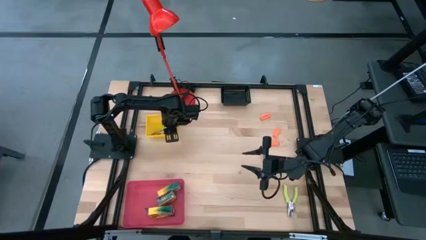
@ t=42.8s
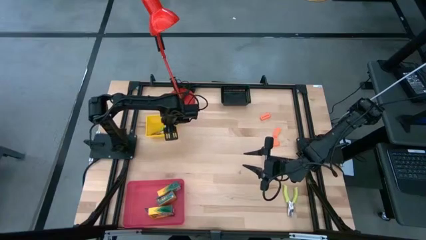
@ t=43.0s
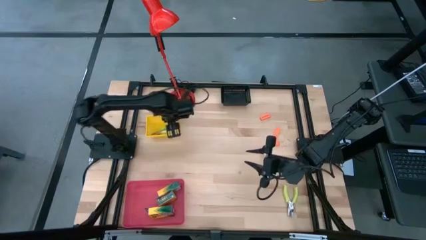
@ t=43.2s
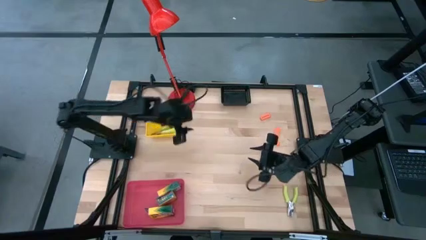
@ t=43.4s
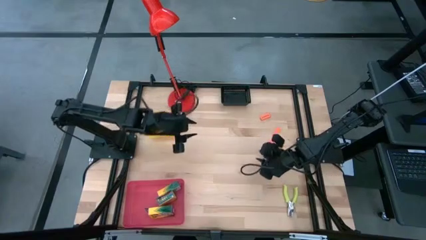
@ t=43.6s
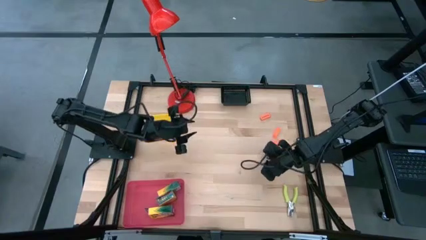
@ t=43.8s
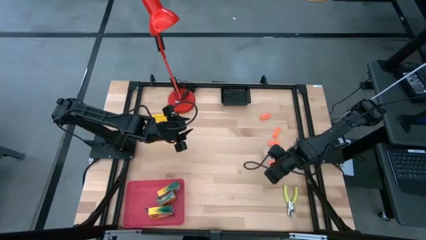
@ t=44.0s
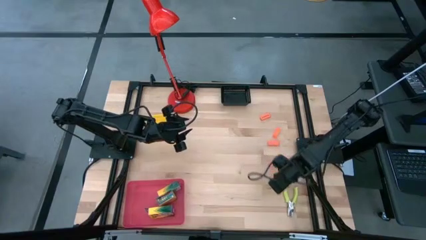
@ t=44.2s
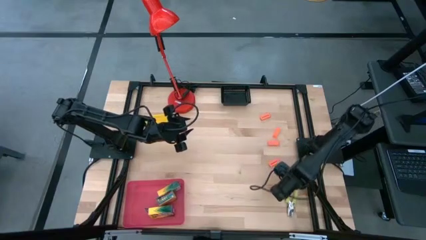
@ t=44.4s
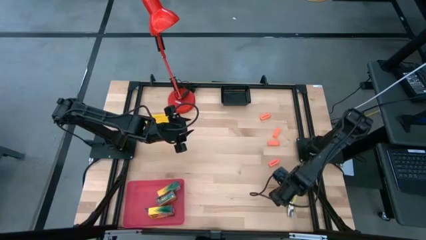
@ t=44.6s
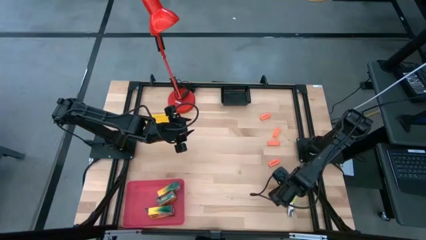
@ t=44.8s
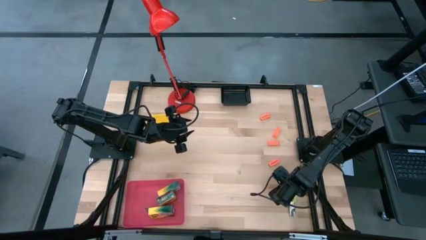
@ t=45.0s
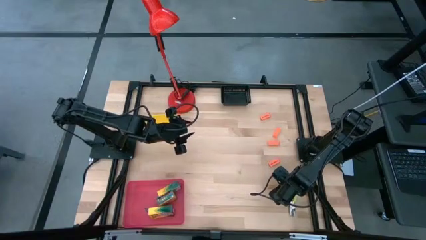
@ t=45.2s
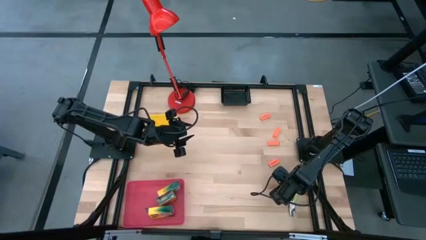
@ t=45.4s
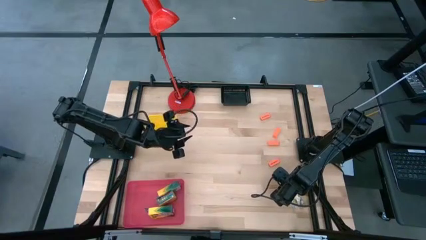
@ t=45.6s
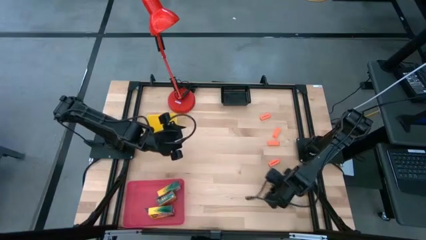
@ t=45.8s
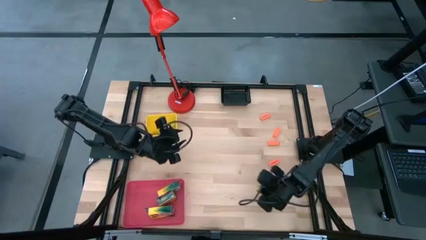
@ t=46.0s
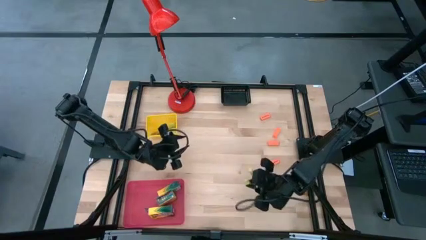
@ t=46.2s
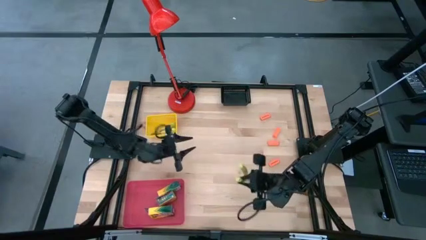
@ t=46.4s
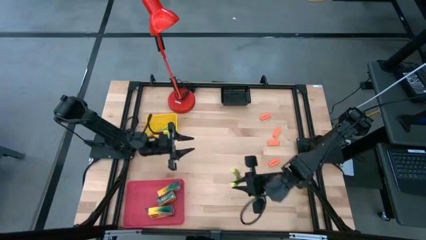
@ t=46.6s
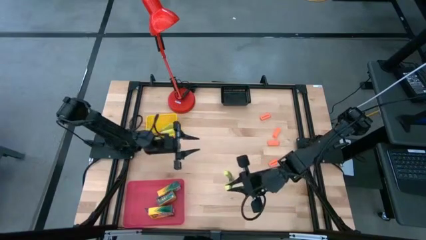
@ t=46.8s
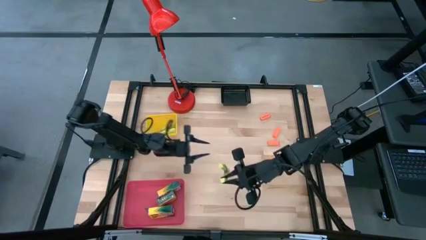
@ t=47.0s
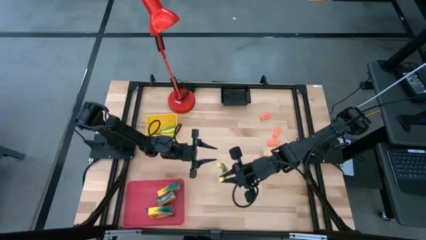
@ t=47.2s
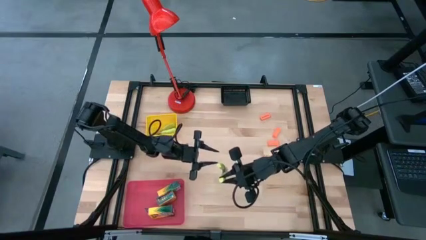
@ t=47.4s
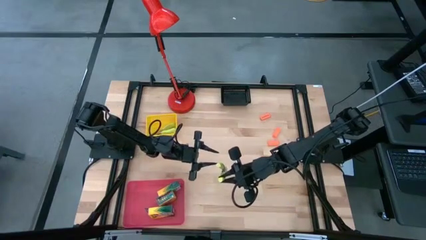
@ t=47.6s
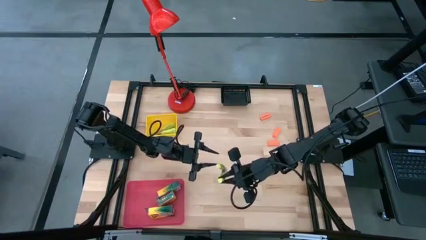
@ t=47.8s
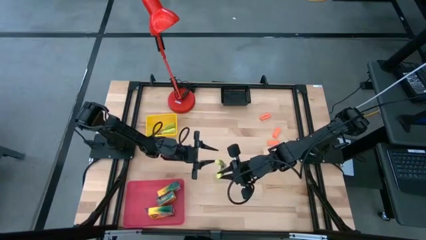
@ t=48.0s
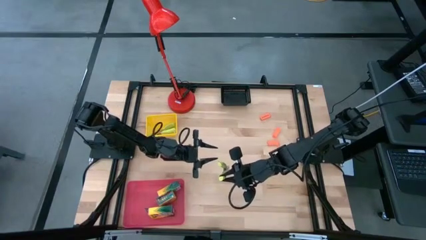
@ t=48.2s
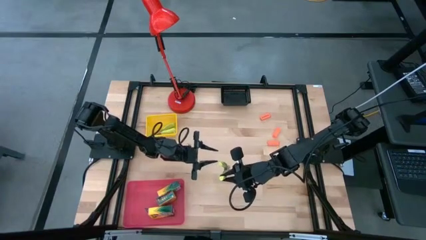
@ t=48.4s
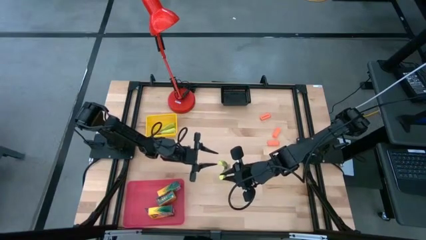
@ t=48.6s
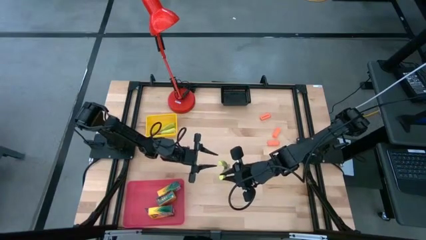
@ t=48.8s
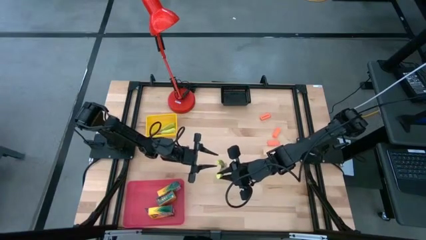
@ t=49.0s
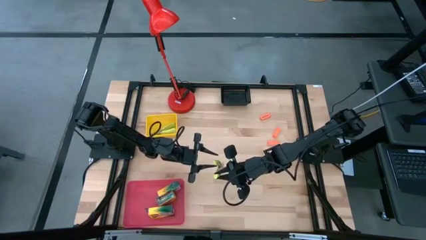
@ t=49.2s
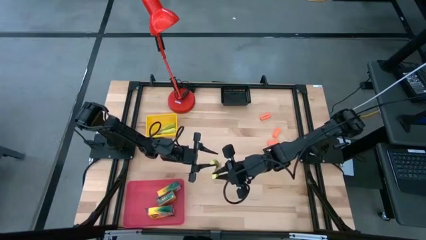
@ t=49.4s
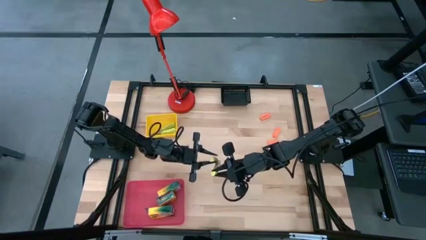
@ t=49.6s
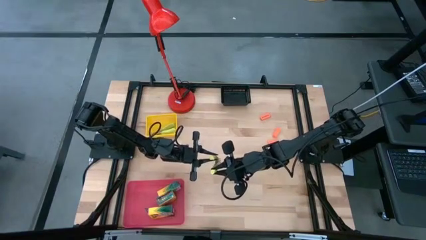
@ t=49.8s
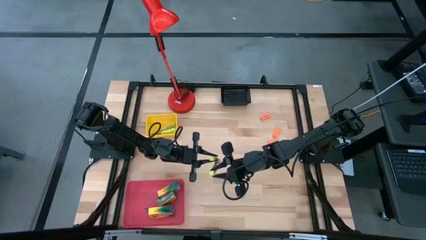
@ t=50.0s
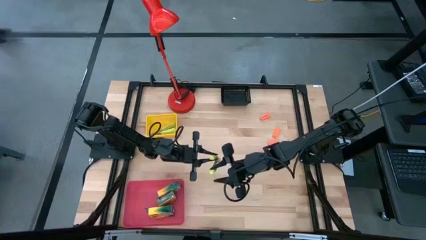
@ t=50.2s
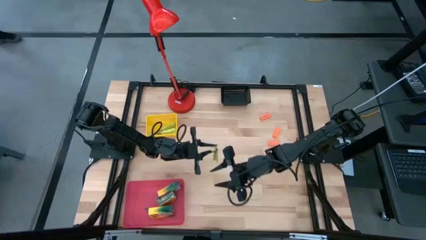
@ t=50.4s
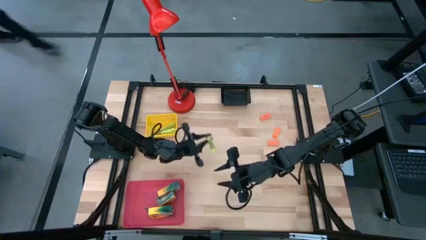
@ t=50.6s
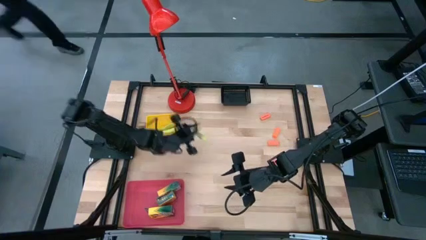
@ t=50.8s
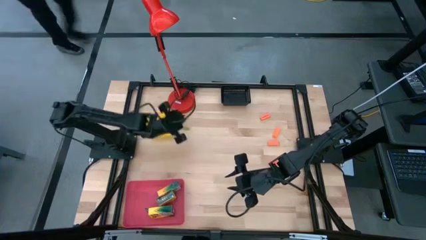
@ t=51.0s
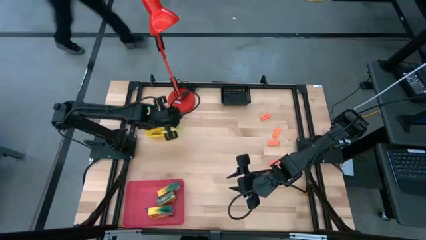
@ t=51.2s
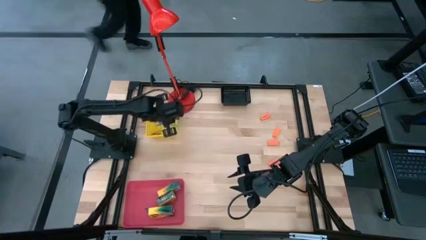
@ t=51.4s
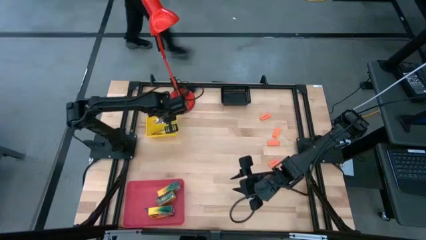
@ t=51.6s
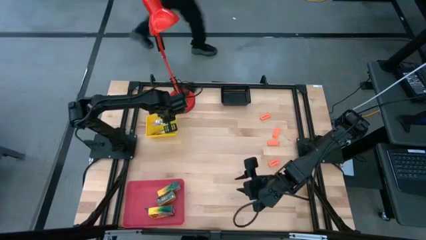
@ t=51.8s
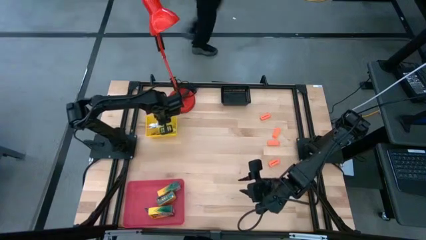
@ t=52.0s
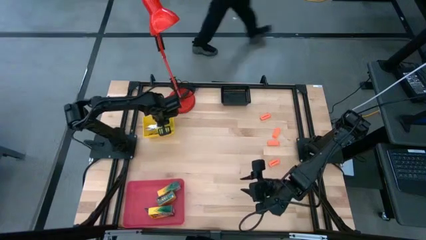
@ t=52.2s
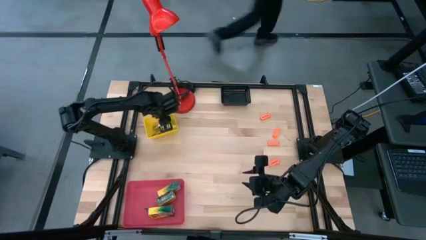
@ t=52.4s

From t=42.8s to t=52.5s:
Task: Pick & Place School Supplies
Put the hole puncher into the yellow bin

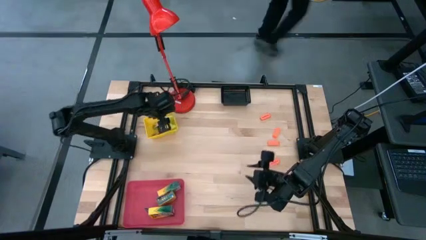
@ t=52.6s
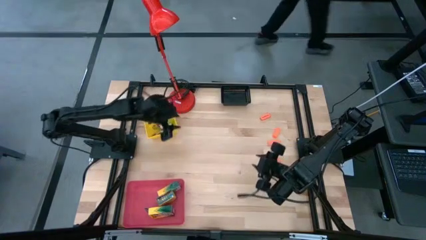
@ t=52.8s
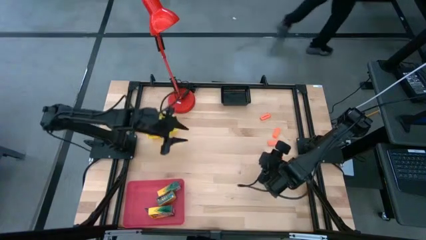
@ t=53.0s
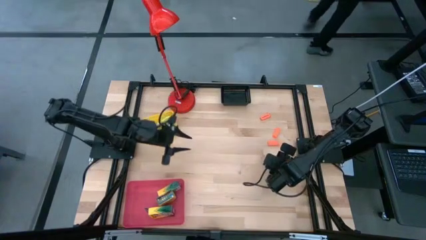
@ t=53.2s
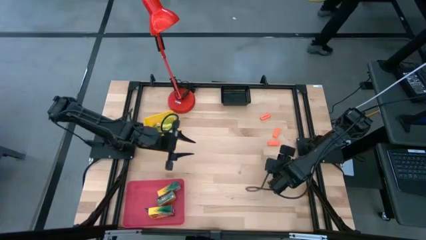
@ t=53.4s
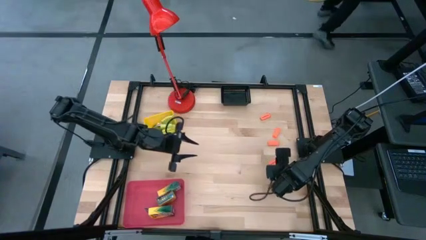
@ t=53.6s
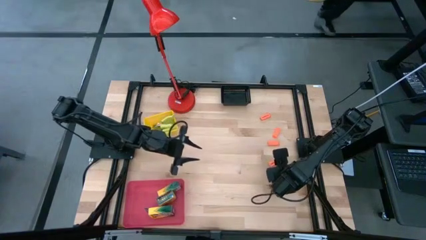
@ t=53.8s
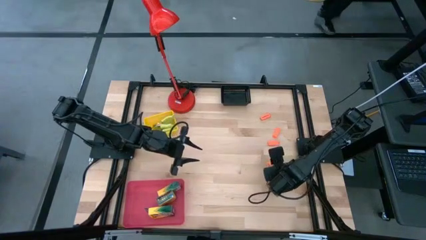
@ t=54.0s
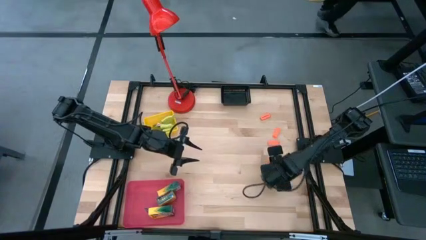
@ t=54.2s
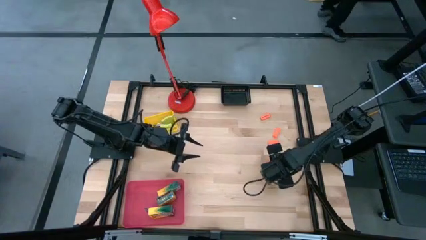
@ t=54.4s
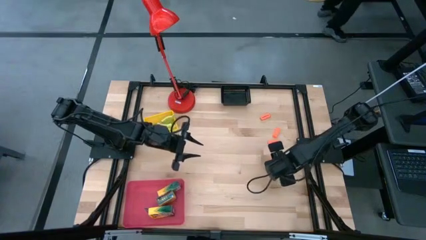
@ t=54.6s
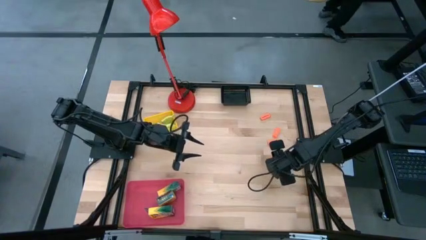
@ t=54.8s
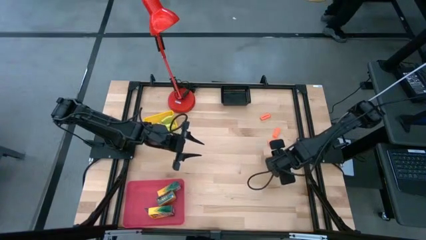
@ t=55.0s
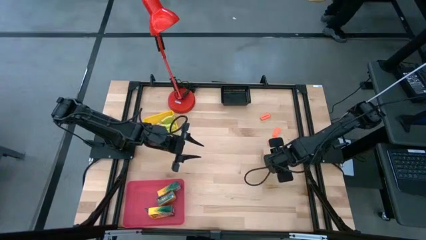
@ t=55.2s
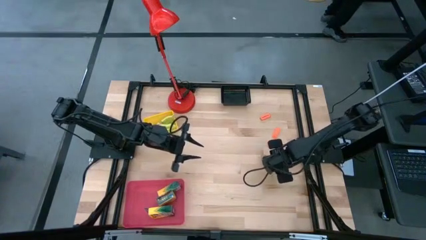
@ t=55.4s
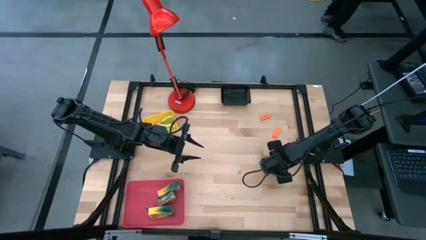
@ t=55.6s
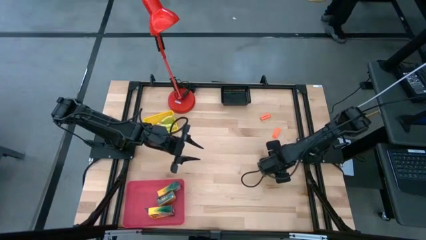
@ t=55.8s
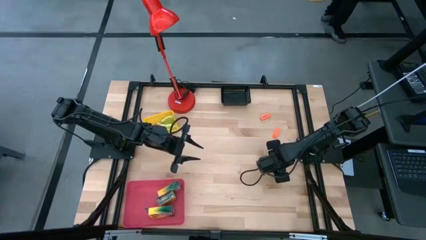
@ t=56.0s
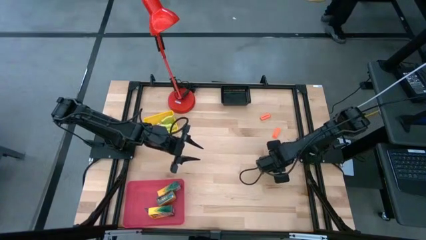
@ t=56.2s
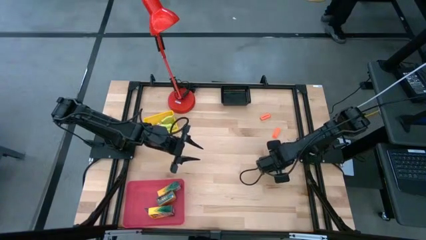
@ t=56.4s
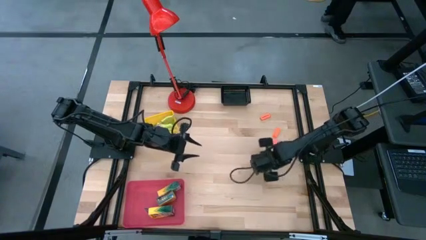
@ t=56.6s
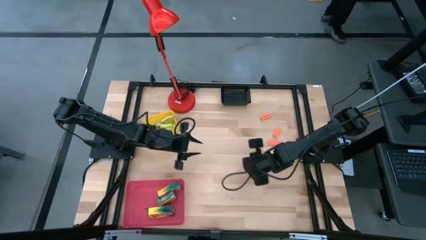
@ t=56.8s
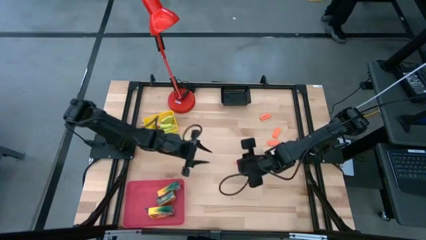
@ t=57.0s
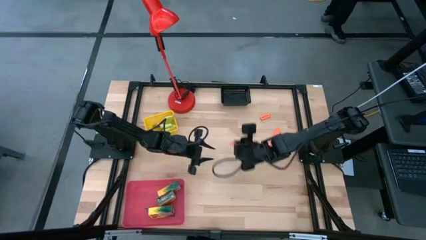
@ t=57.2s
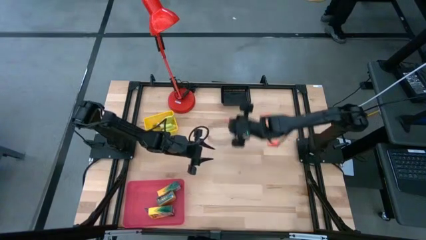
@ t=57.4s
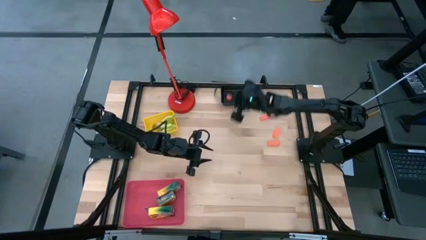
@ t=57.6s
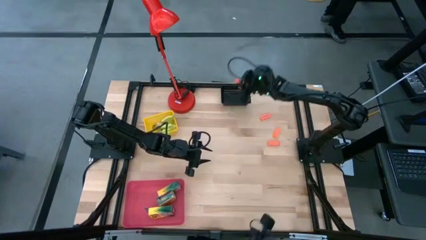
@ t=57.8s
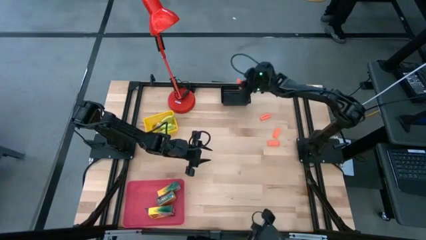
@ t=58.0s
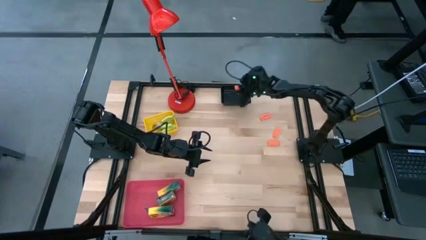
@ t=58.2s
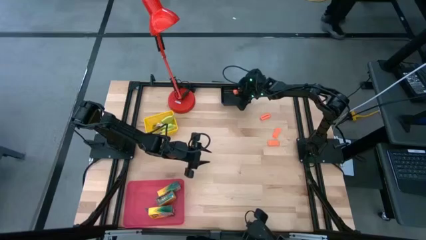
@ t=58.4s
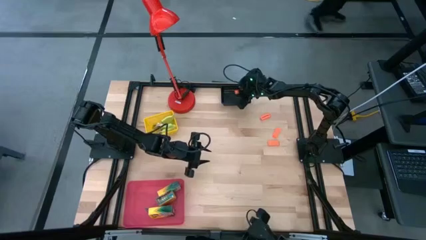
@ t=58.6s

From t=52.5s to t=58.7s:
Put the bottom eraser into the black bin
